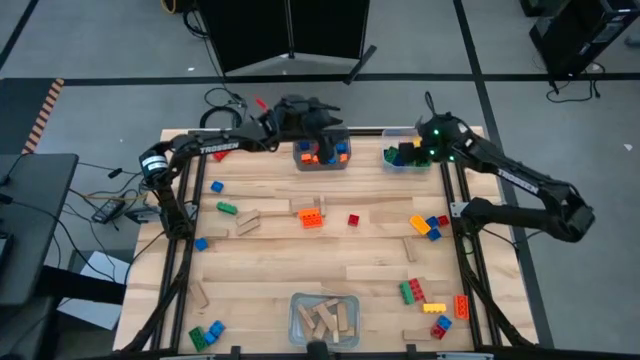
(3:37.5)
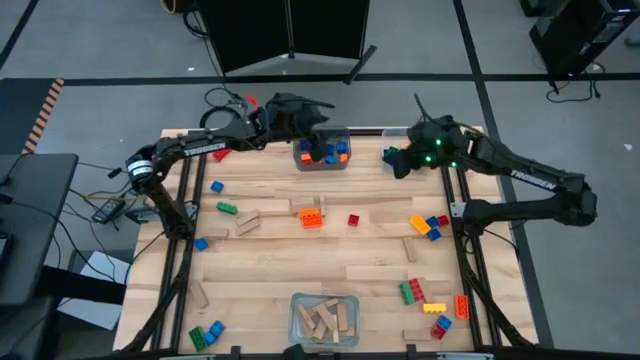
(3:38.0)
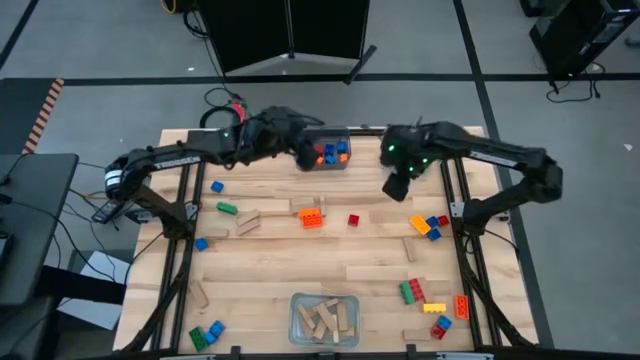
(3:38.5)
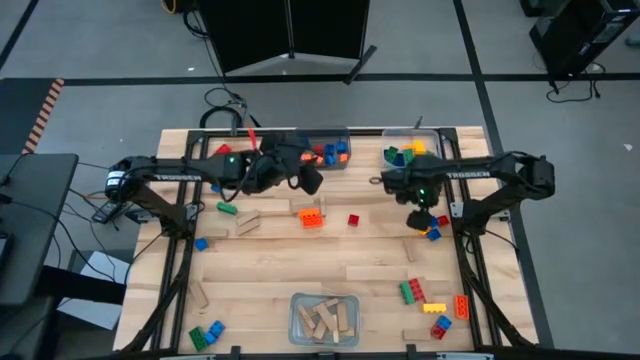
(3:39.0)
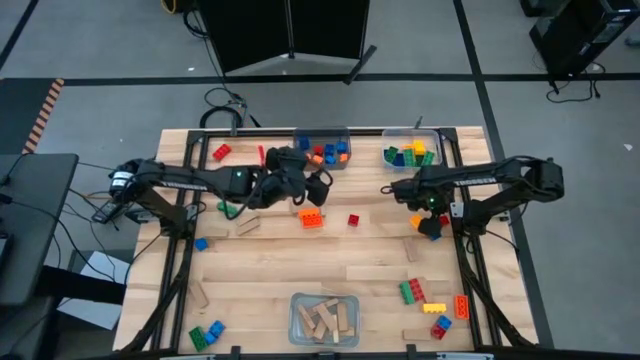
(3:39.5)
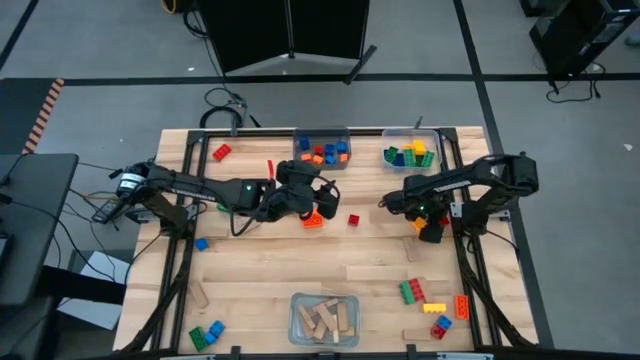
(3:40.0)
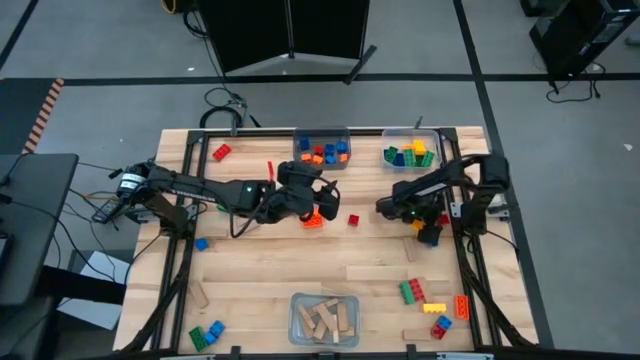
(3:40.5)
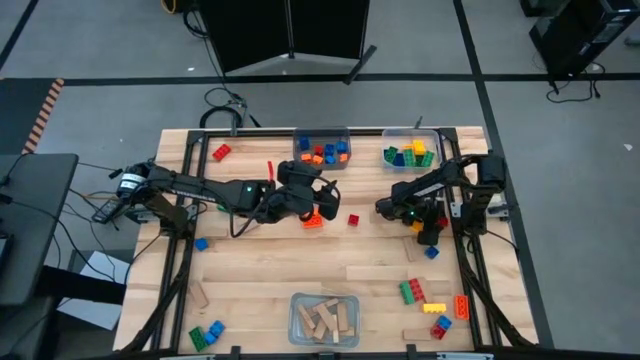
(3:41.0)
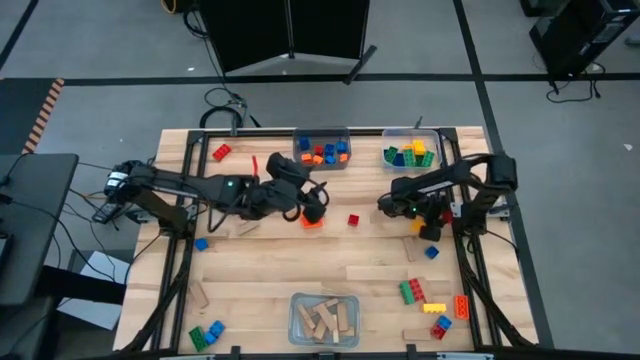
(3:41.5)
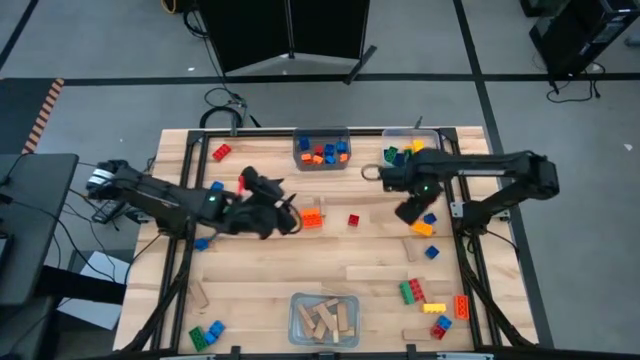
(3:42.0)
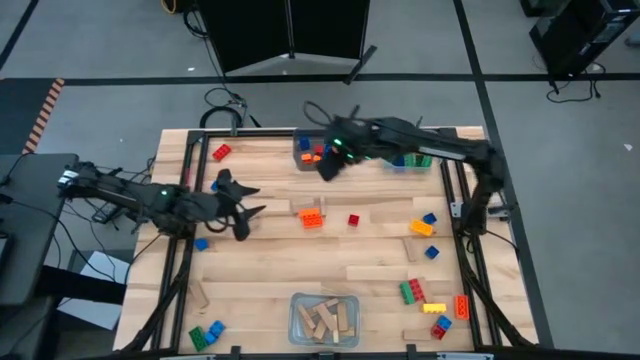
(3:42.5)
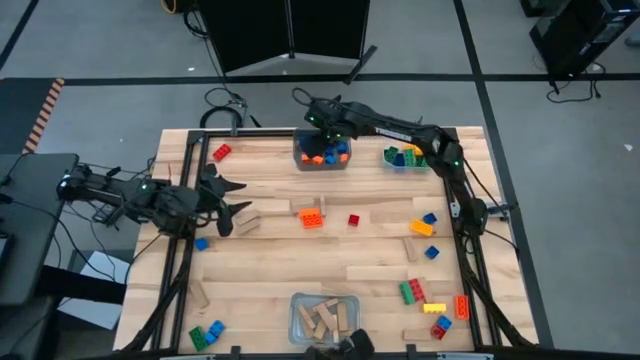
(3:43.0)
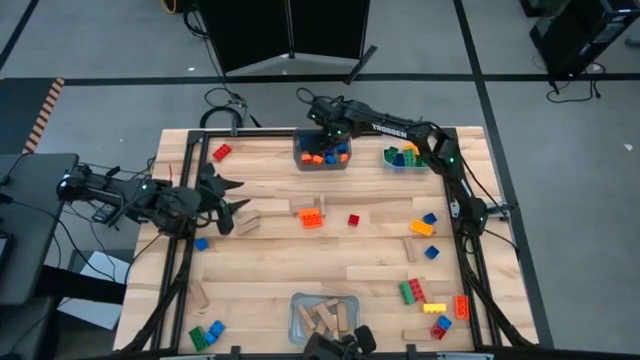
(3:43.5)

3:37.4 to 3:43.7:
Task: Sort blocks by size
Put the small red game piece into the black bin

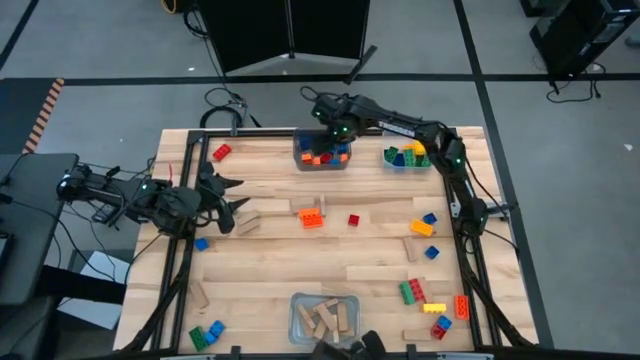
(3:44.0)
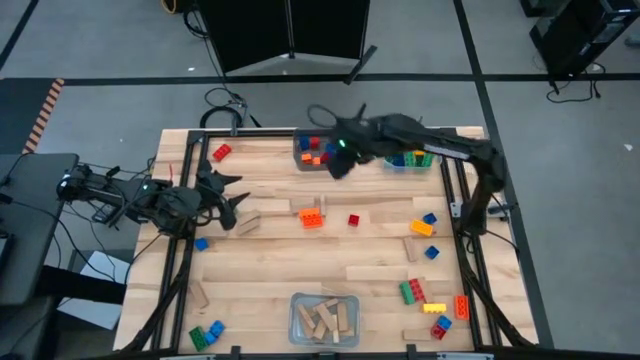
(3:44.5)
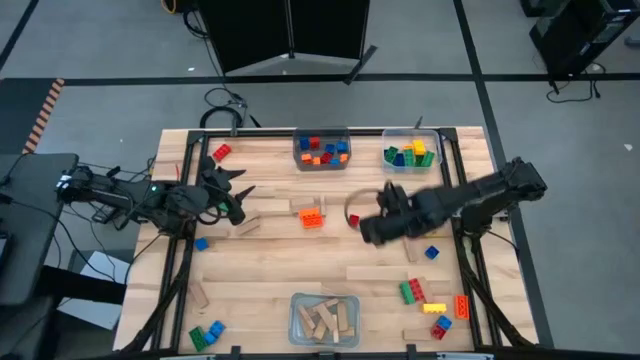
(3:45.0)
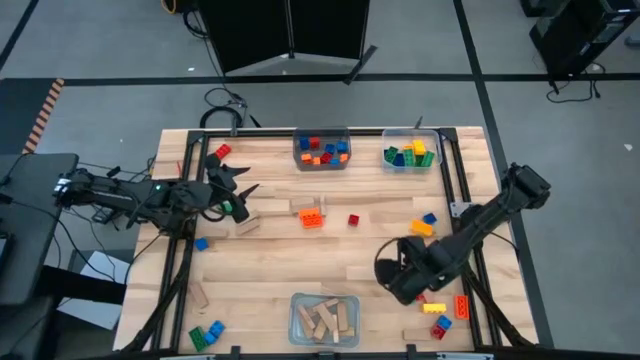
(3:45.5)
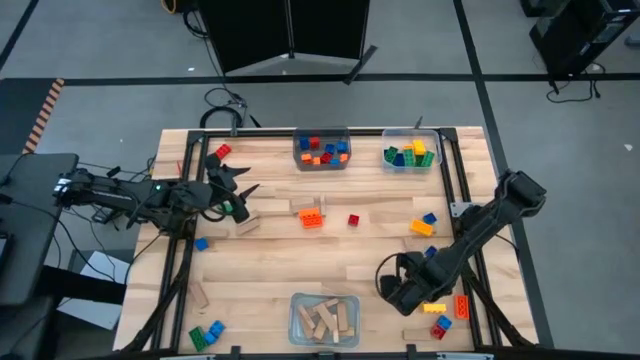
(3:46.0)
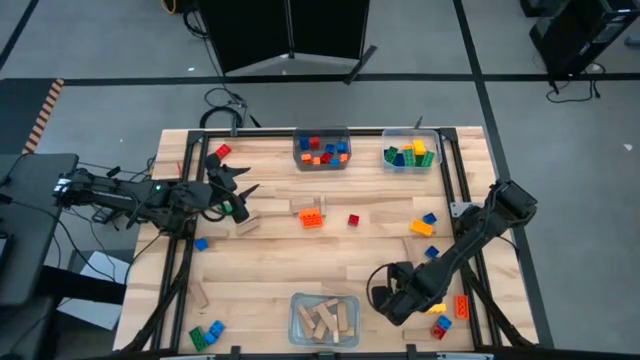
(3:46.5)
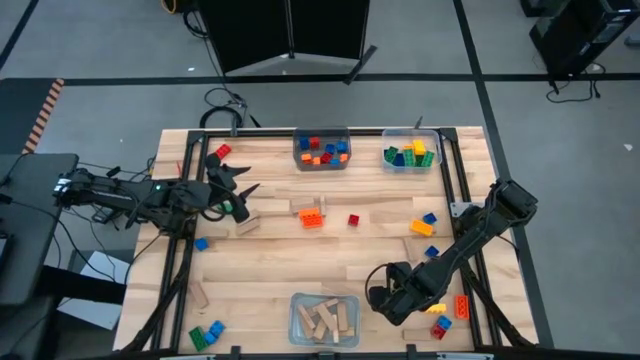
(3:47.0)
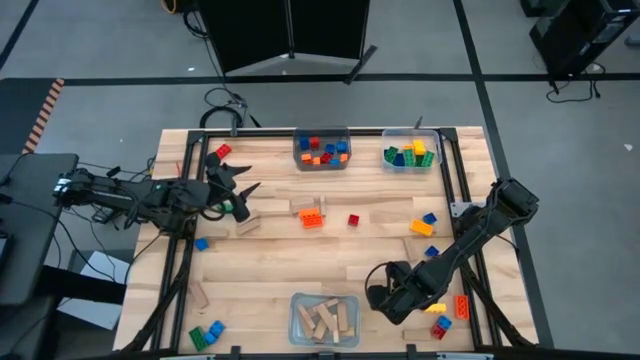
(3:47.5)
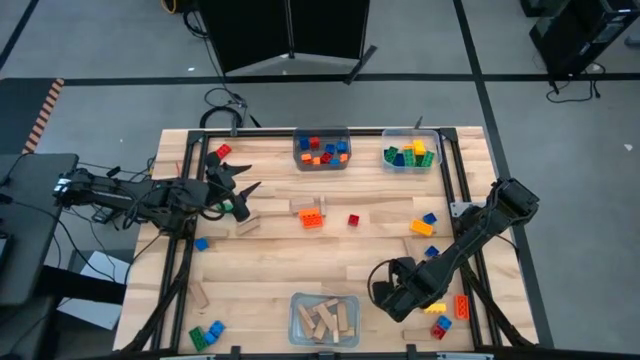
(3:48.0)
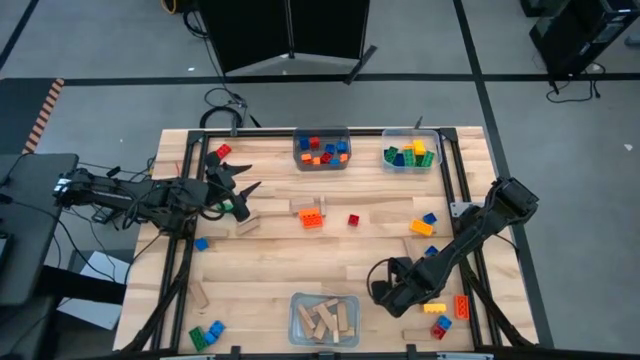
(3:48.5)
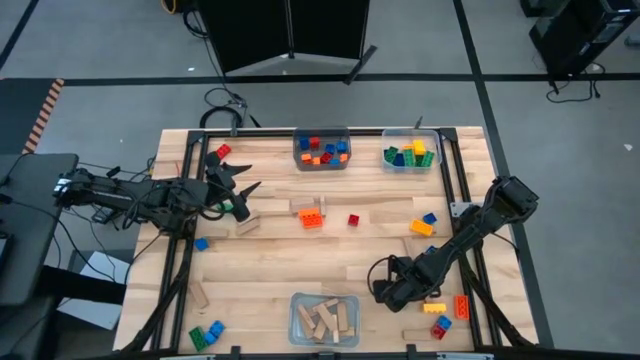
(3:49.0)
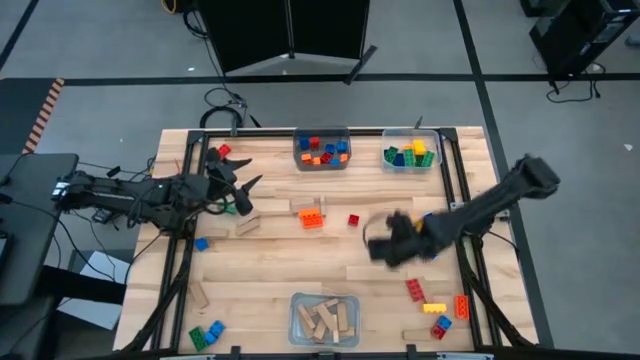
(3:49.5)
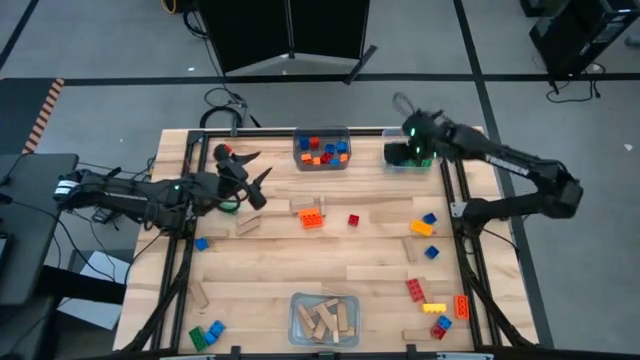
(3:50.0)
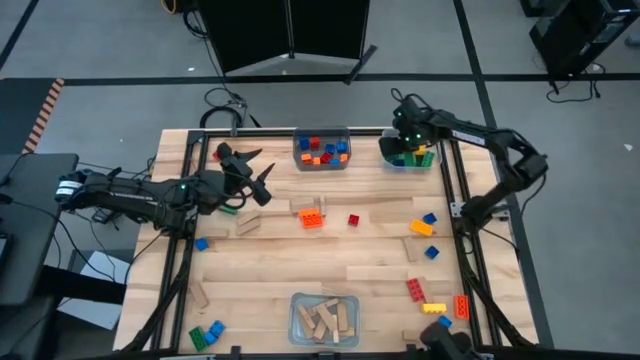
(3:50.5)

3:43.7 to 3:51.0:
Put the large green game piece into the transparent bin

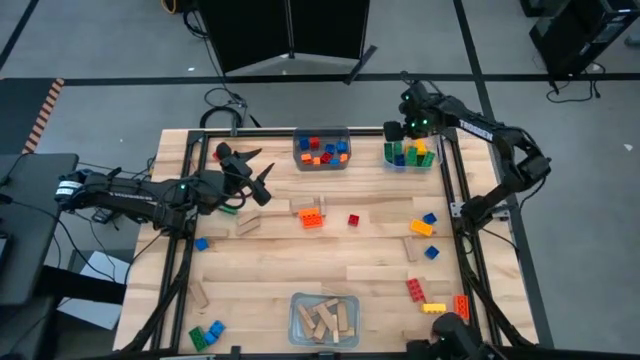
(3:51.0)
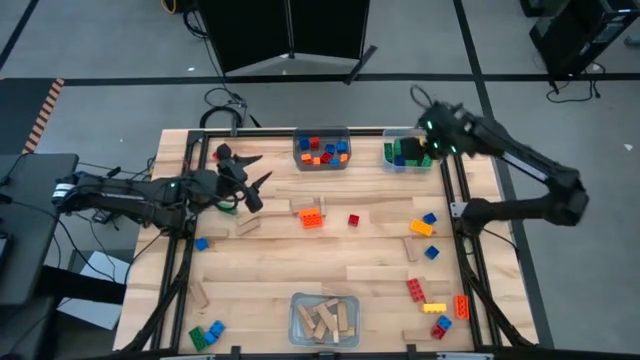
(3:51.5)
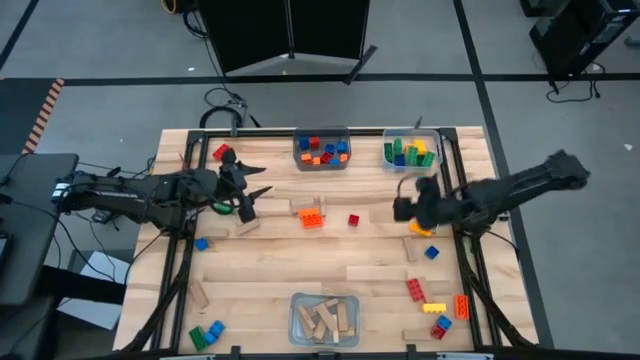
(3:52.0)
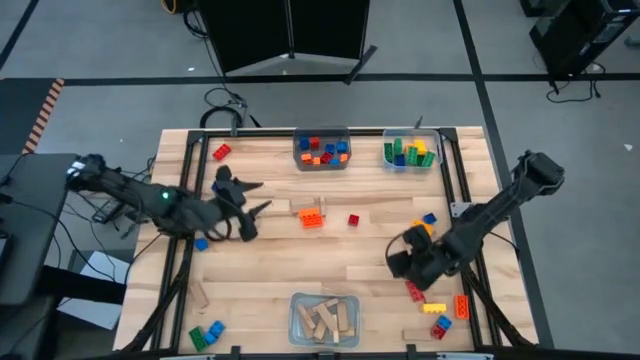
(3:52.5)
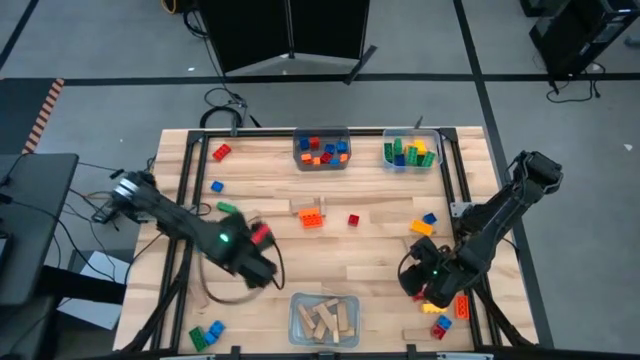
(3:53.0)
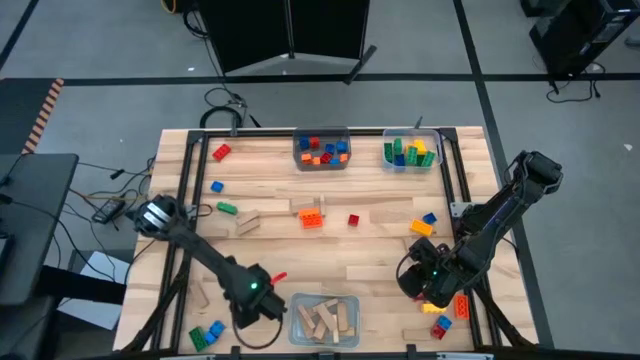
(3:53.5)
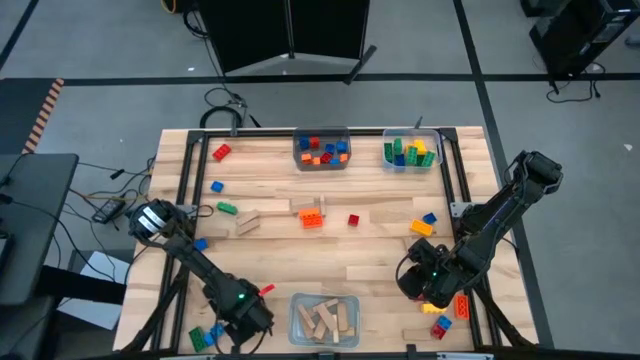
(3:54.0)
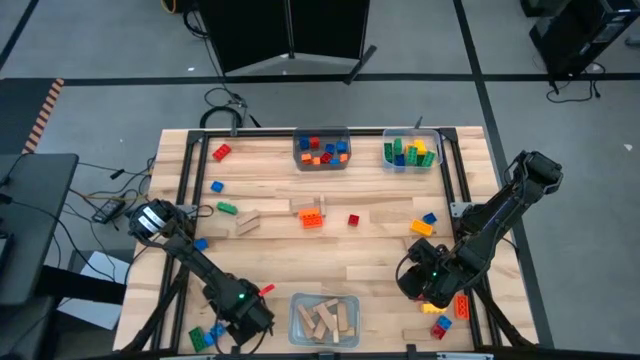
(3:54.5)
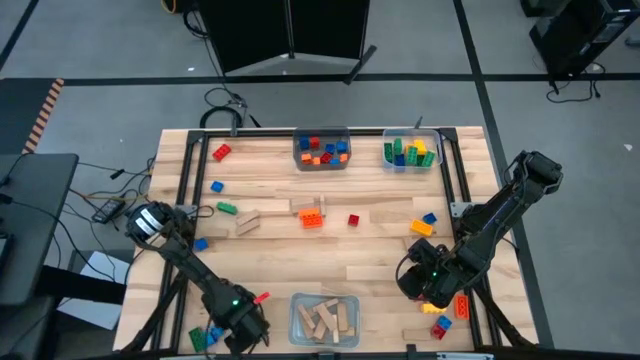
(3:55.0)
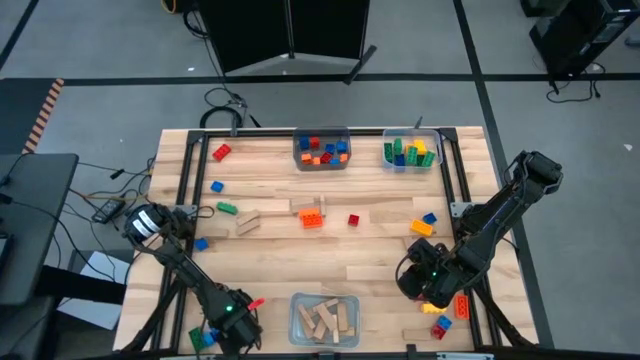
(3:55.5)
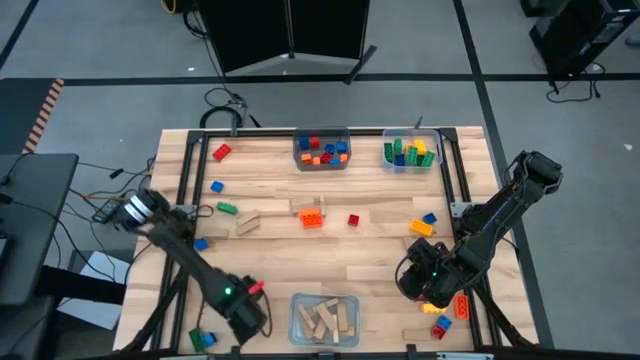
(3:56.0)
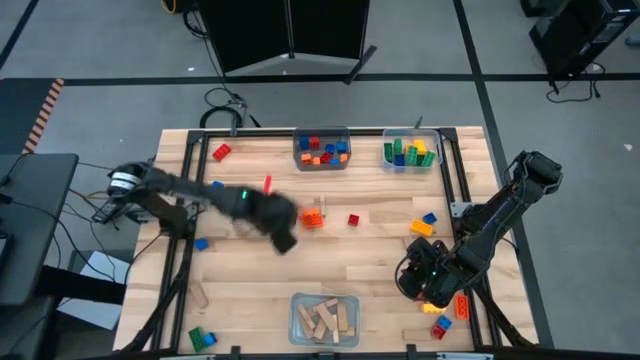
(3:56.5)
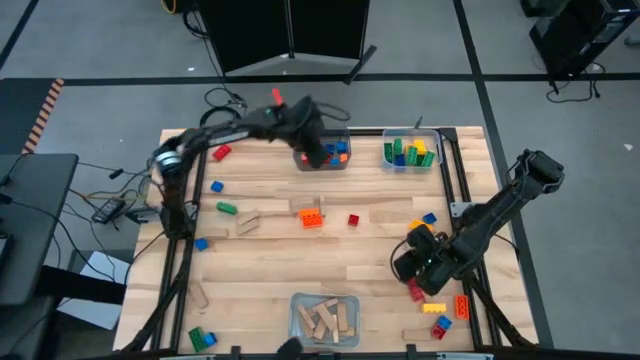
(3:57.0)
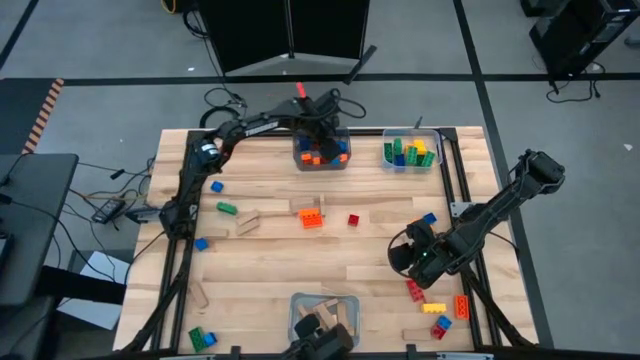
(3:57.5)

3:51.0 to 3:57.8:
Put the small blue game piece into the black bin

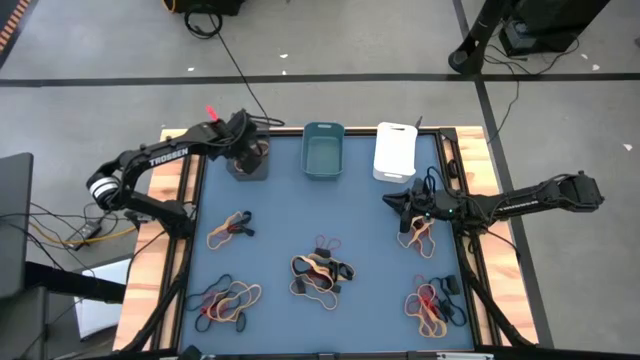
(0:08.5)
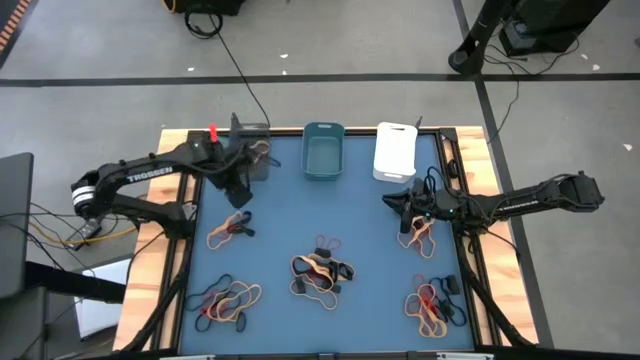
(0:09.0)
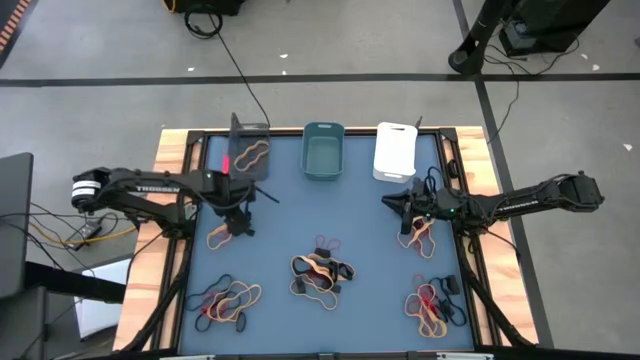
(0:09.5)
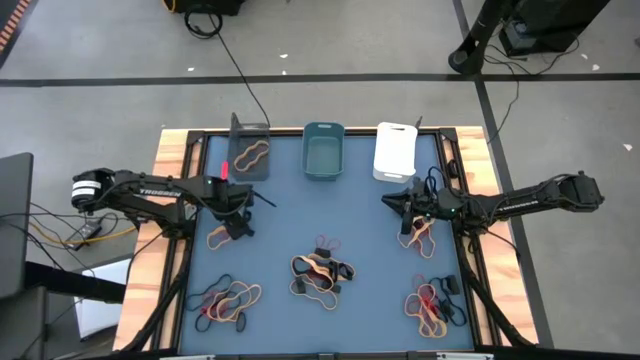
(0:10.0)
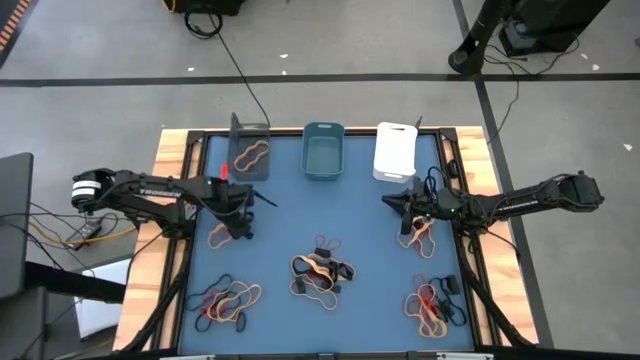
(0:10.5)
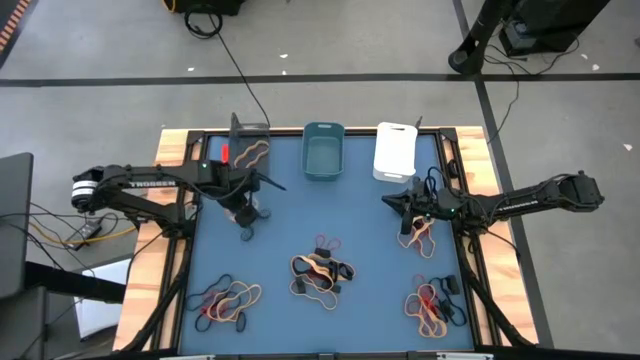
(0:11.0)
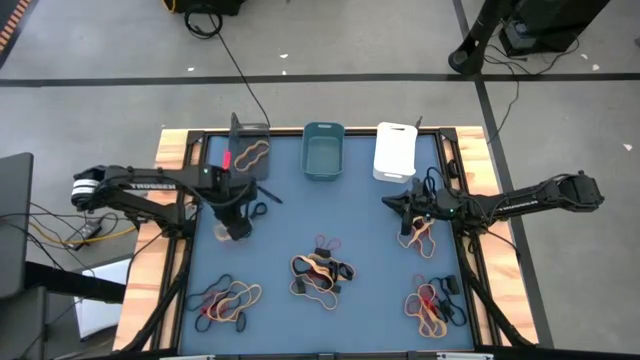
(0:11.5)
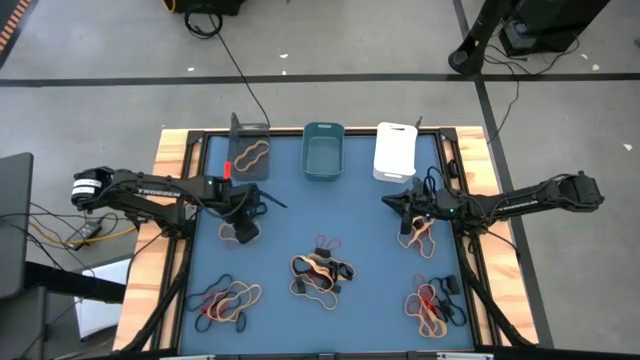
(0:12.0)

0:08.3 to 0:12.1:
Task: Sort rubber bands into baskets
Put the yellow rubber band into the black bin
